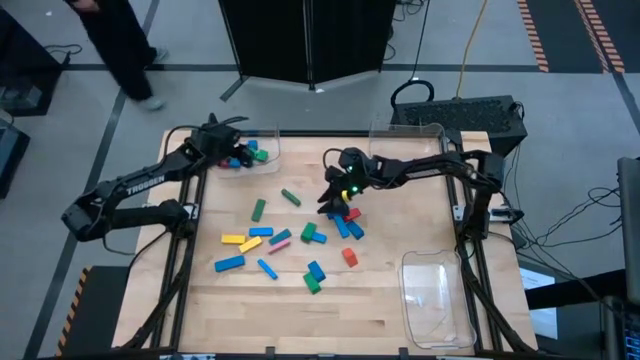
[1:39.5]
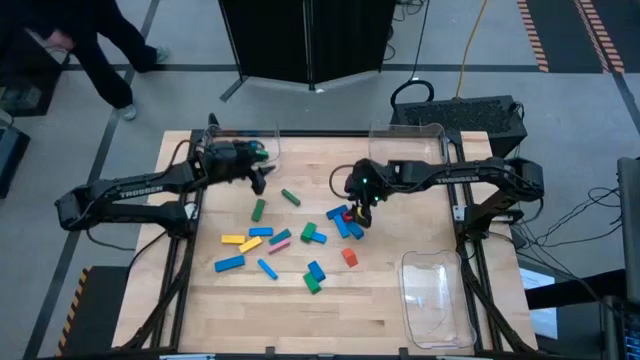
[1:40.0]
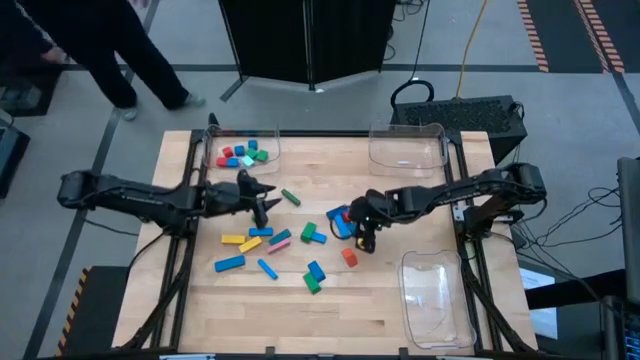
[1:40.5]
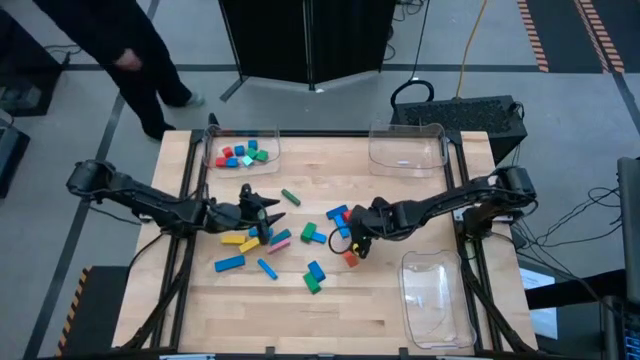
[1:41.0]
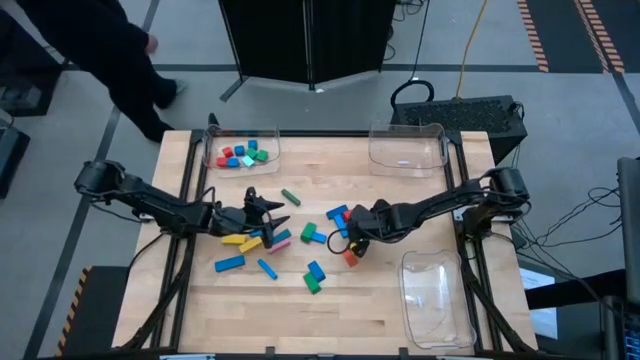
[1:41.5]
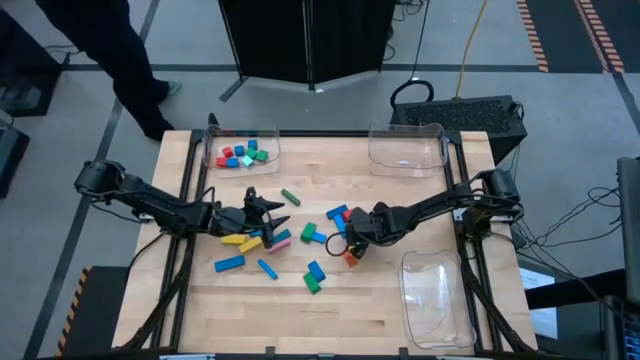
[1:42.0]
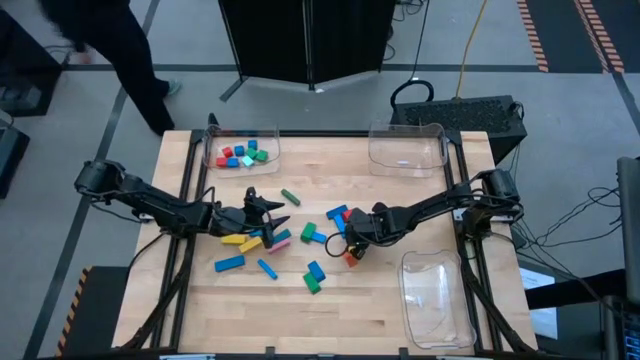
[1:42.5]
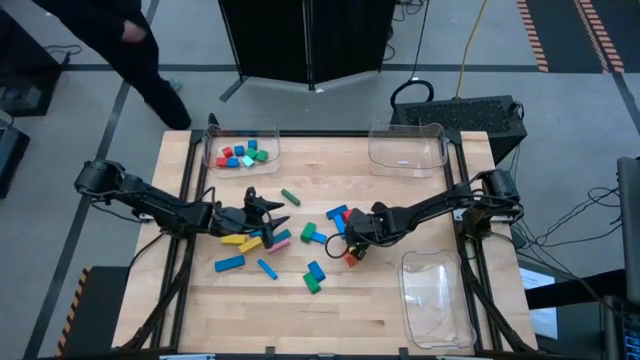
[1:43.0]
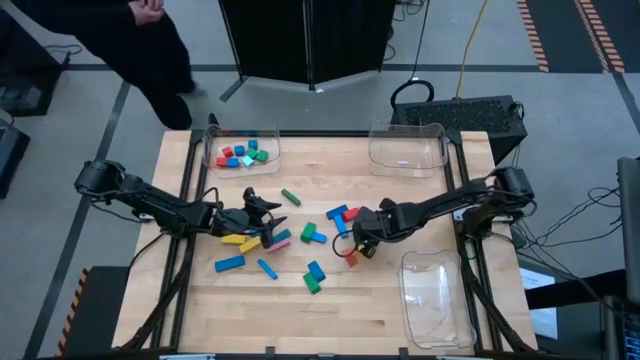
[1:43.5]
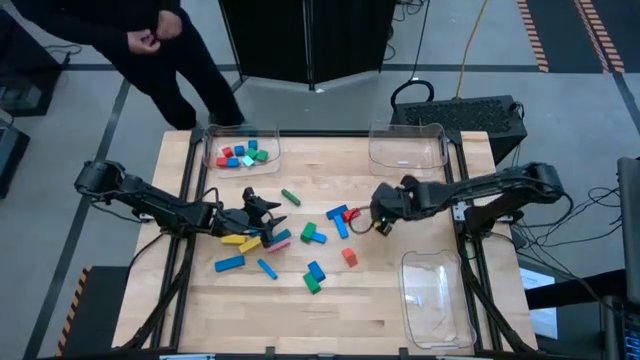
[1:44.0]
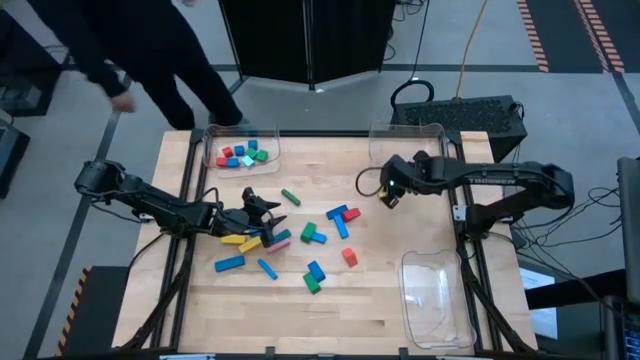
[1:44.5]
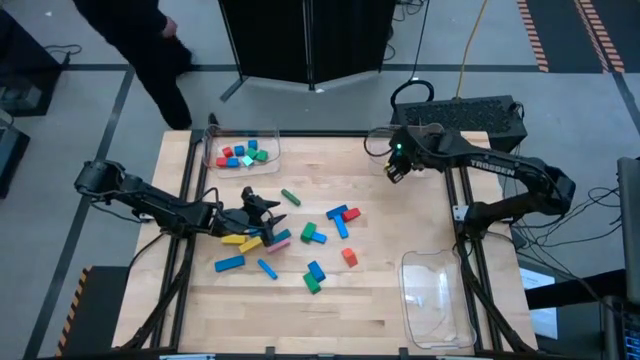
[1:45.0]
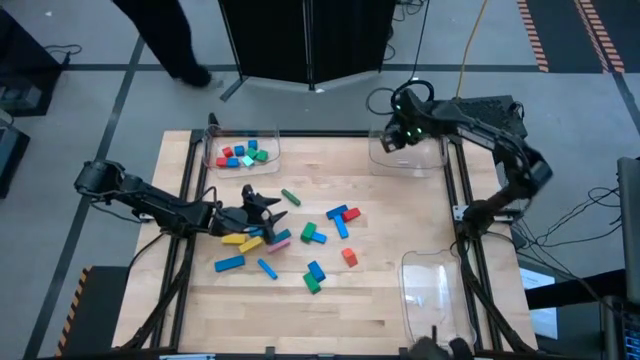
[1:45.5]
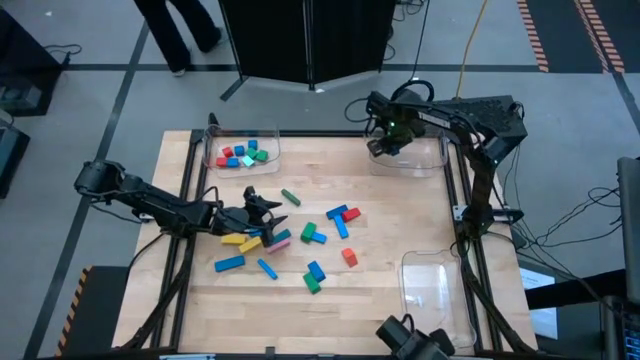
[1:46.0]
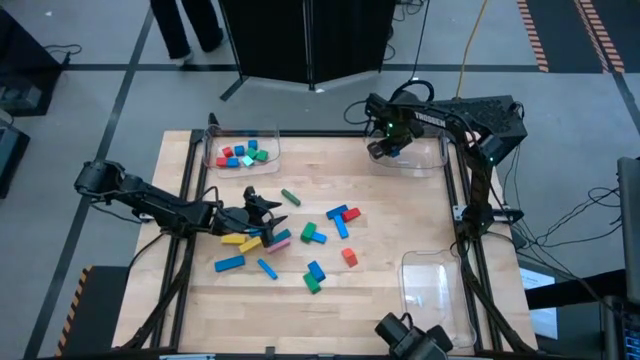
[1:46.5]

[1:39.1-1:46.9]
Task: Sort blocks by size
Put the blue triangular block into the top right transparent bin

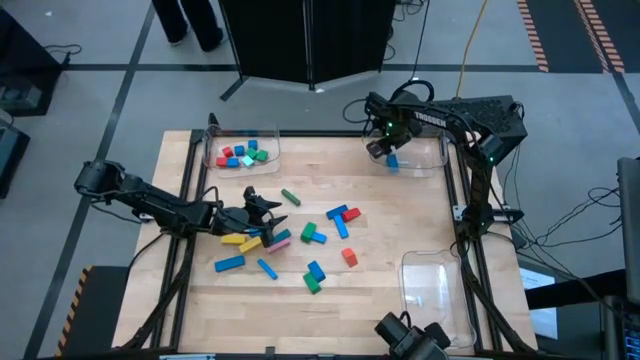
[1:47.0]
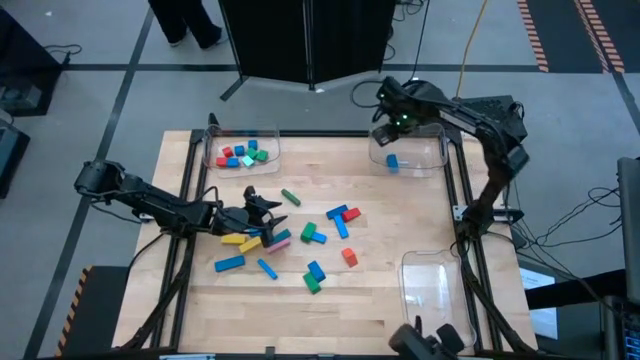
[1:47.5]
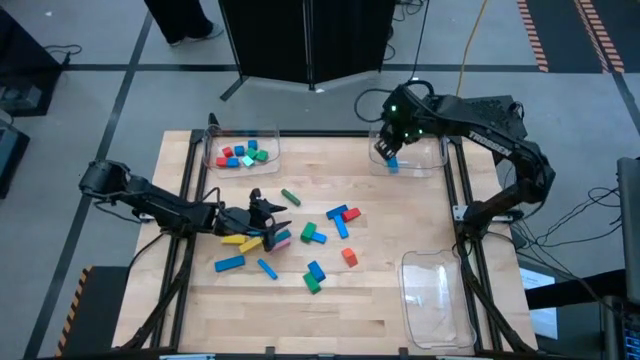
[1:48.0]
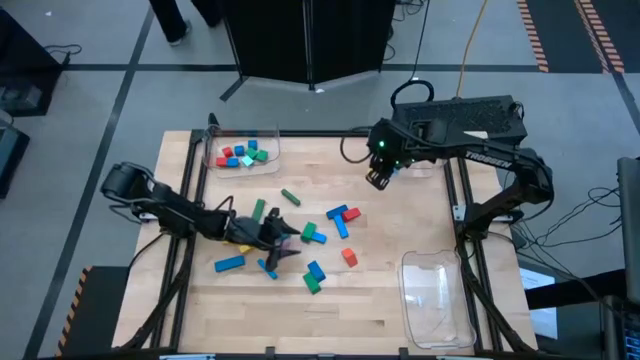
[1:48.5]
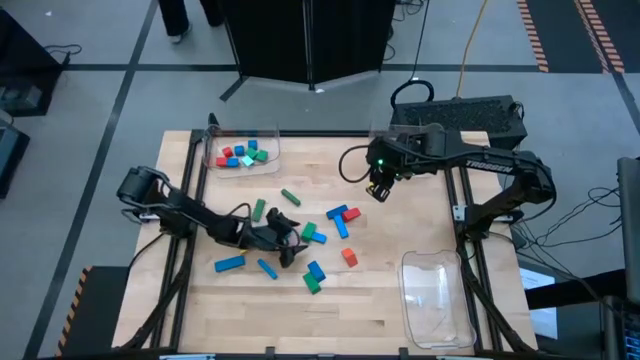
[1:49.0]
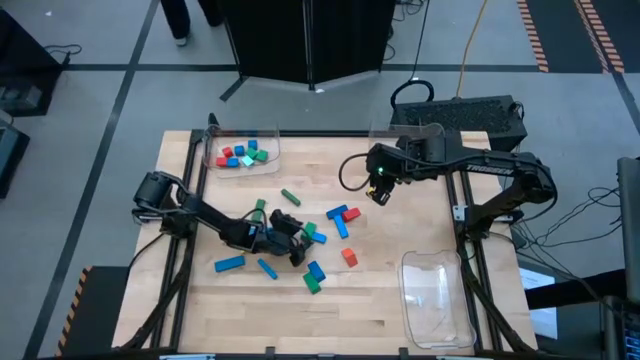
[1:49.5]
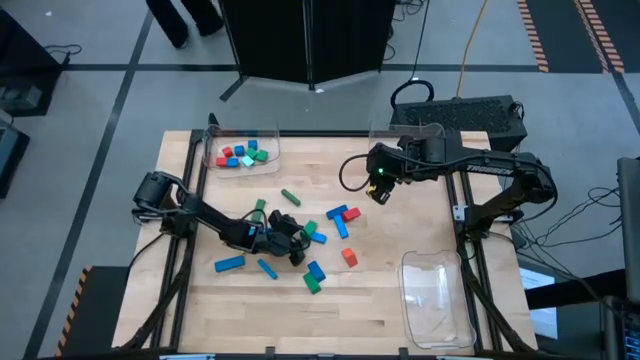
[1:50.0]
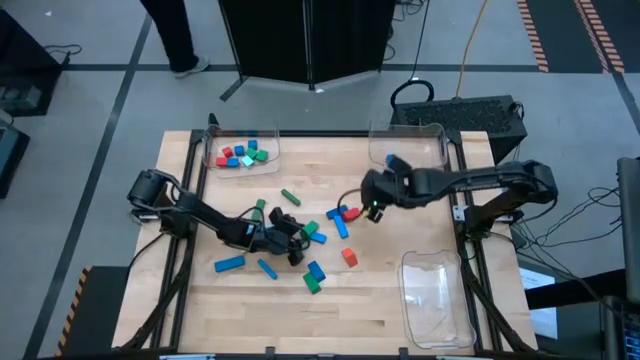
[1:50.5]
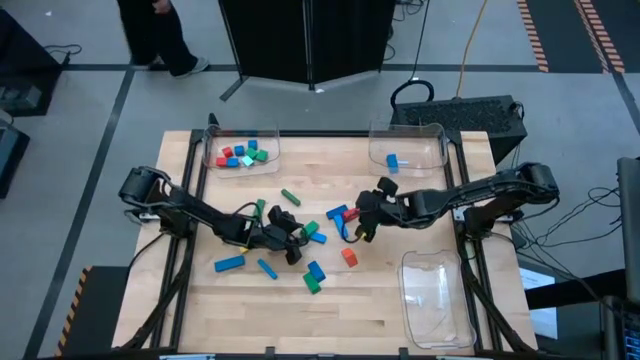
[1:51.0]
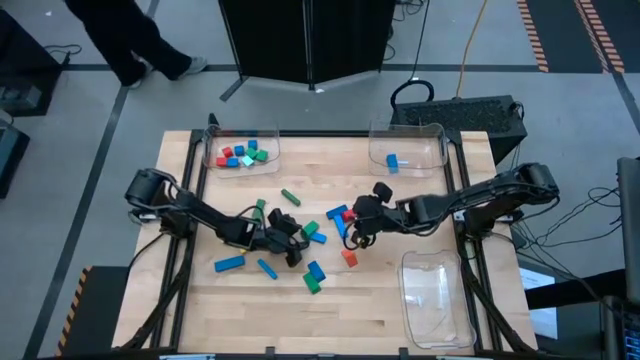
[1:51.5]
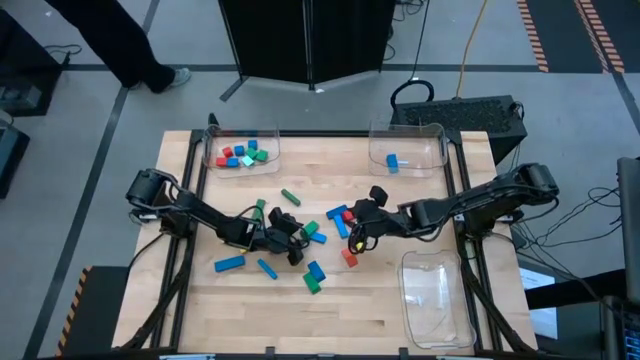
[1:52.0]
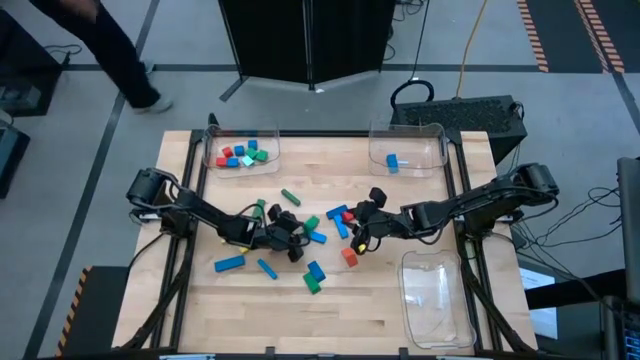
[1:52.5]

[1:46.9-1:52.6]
Put the green triangular block into the top right transparent bin

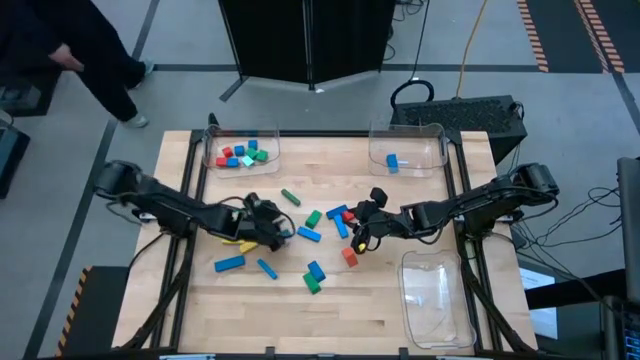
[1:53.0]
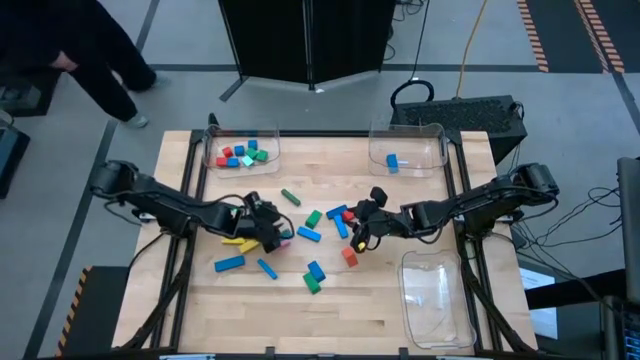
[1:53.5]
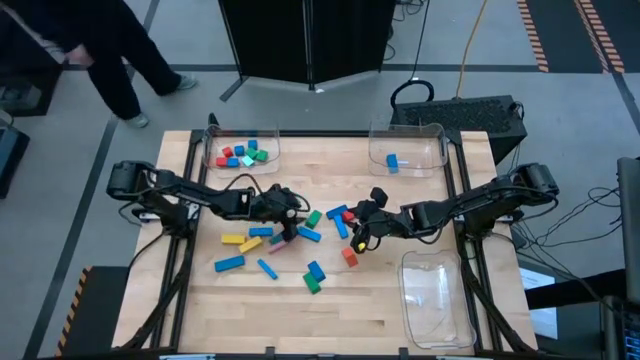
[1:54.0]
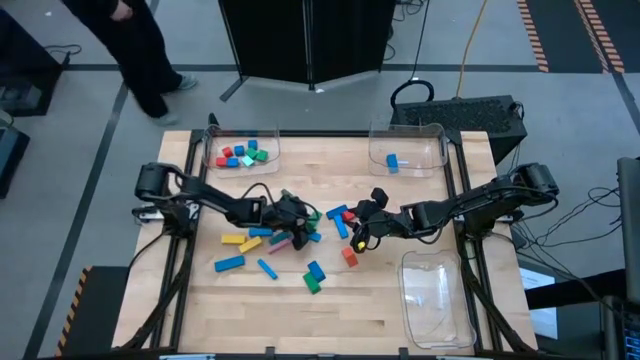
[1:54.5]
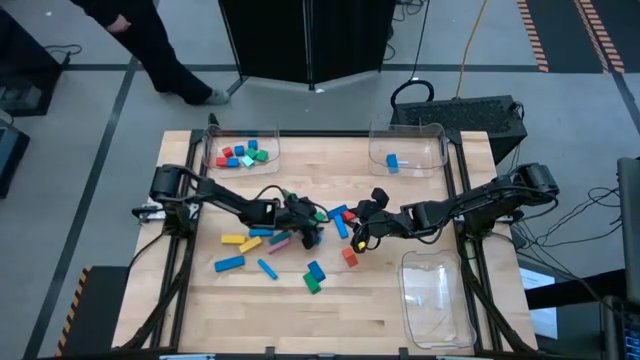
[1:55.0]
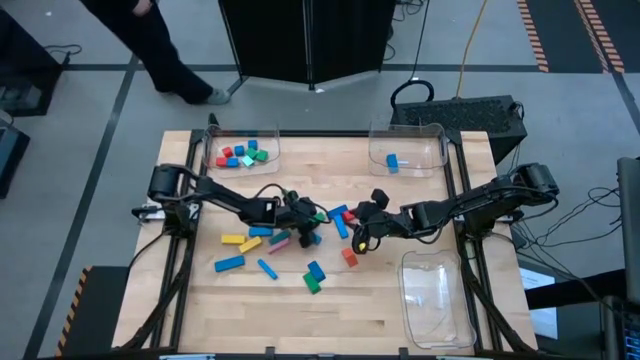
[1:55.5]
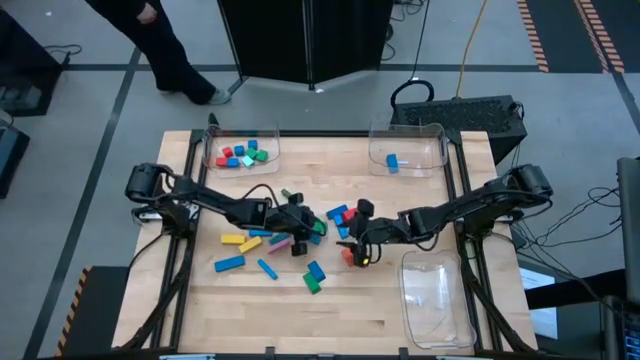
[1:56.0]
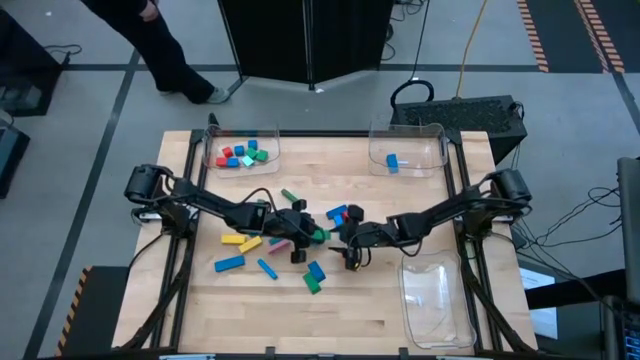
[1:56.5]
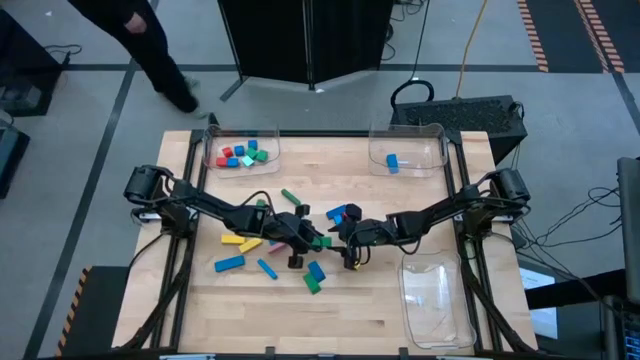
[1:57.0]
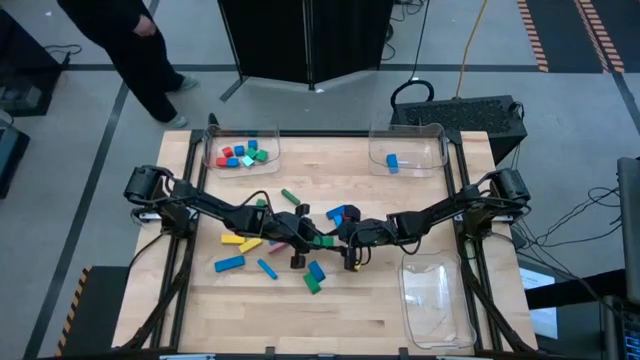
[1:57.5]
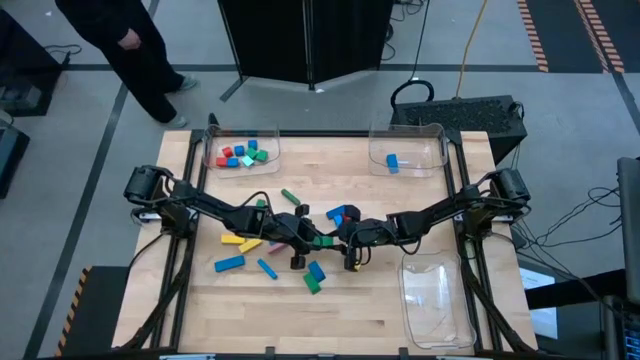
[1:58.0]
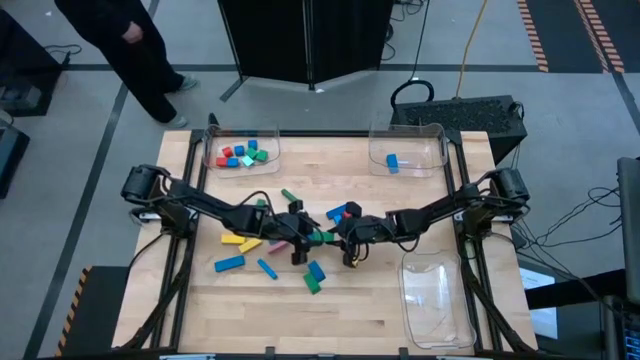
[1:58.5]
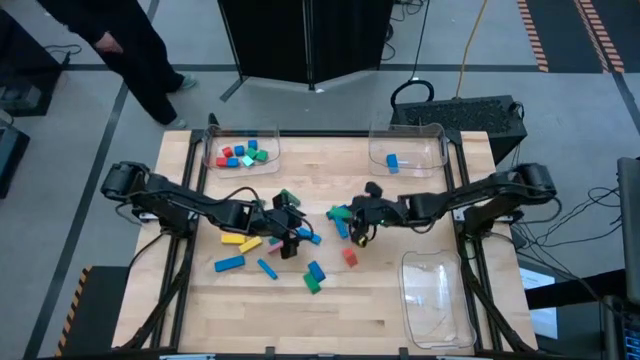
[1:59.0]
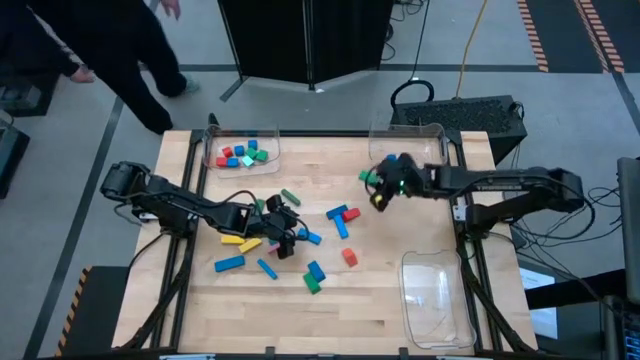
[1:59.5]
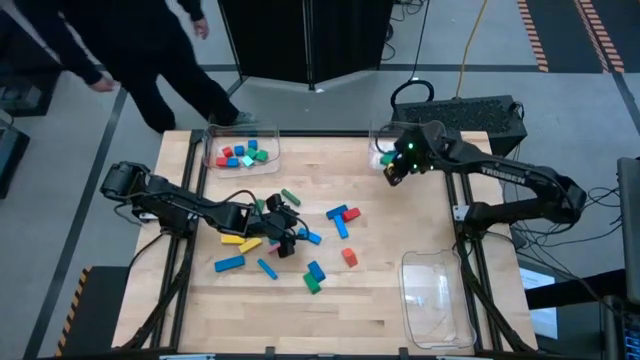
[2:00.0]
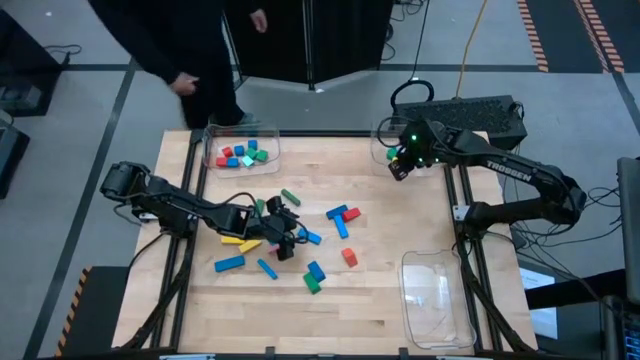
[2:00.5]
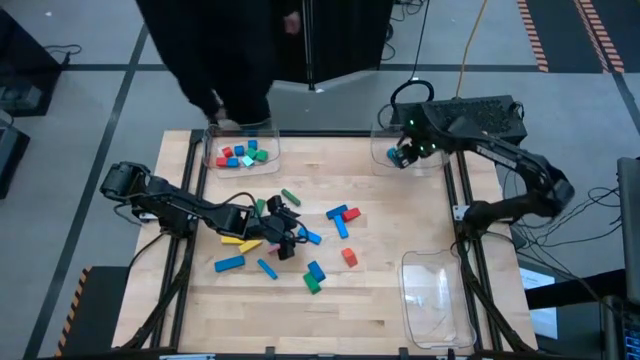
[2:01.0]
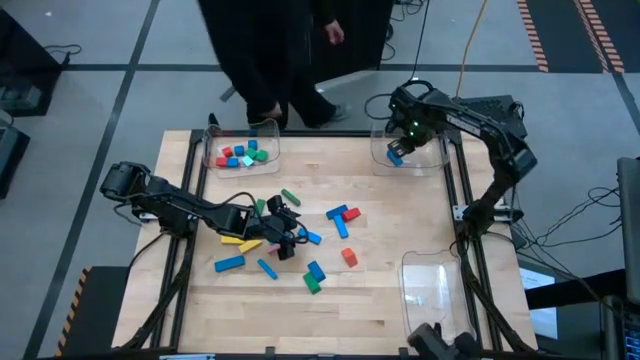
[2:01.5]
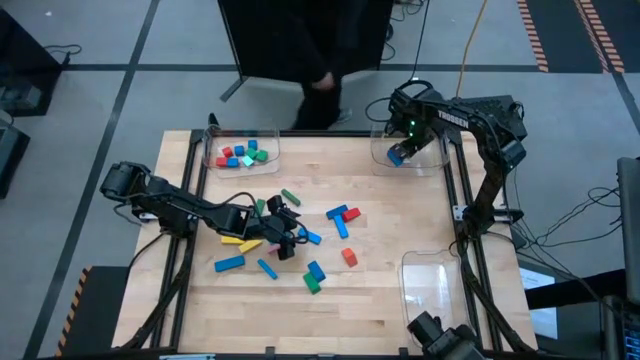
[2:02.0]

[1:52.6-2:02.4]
Put the green triangular block into the top right transparent bin
